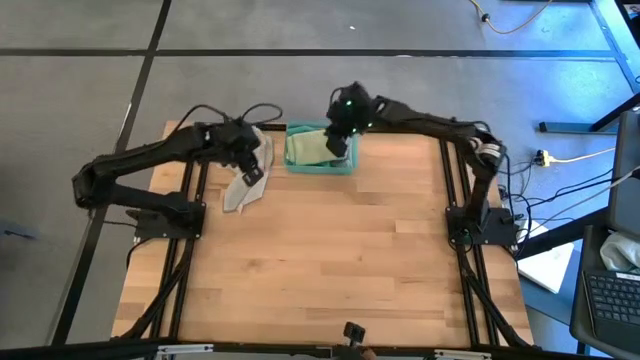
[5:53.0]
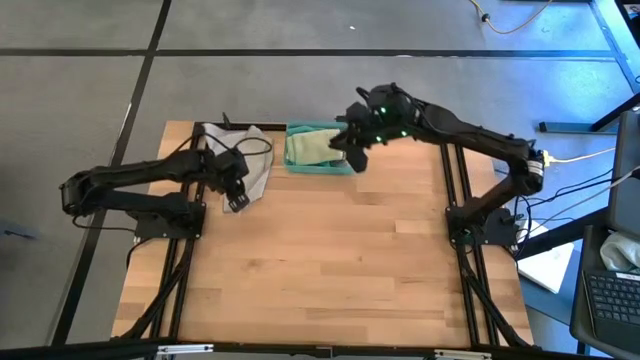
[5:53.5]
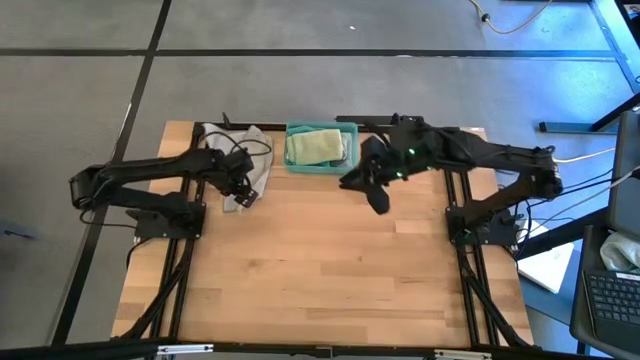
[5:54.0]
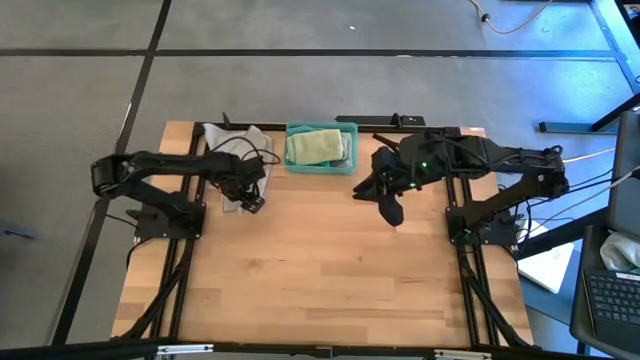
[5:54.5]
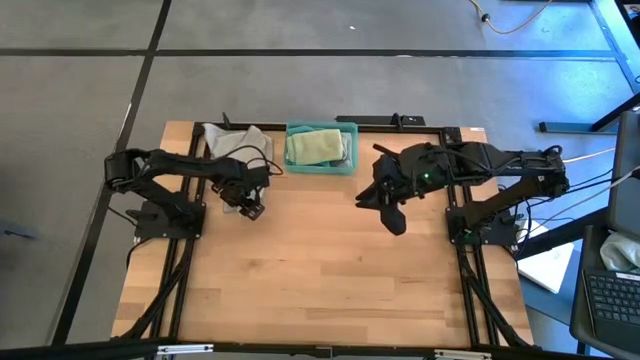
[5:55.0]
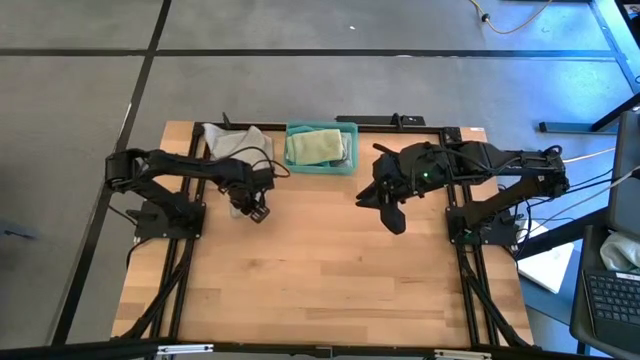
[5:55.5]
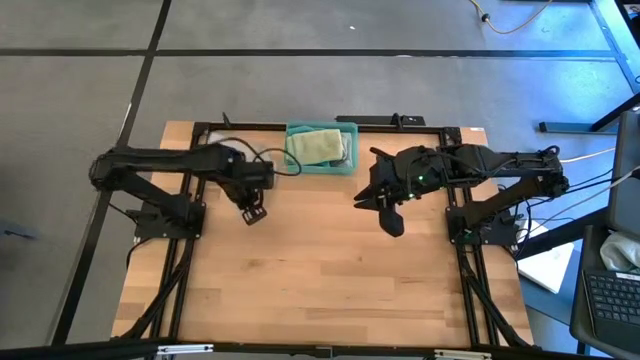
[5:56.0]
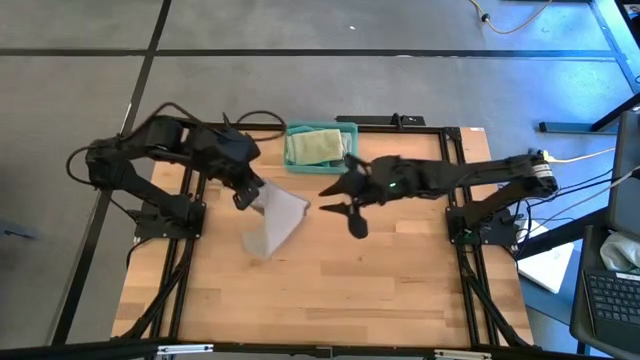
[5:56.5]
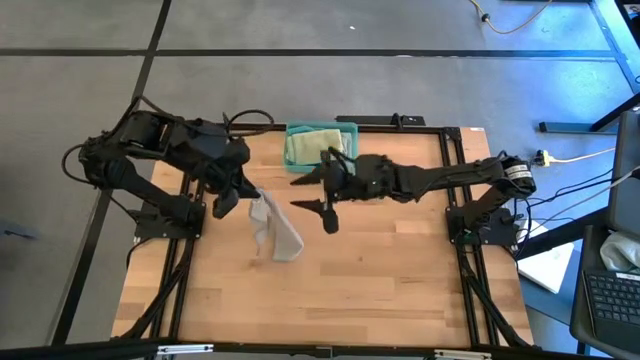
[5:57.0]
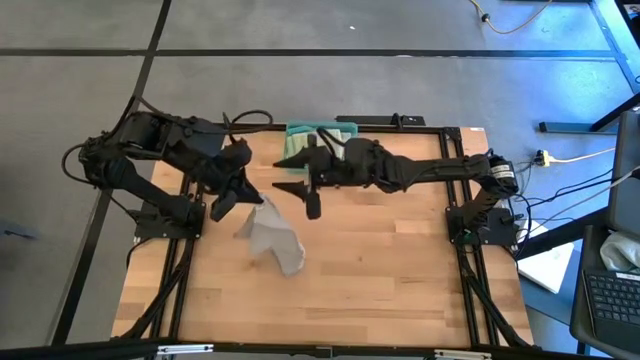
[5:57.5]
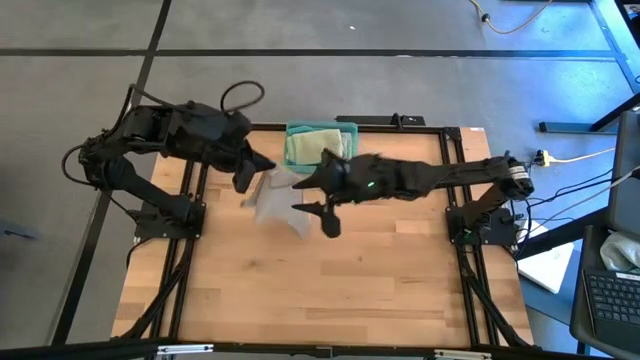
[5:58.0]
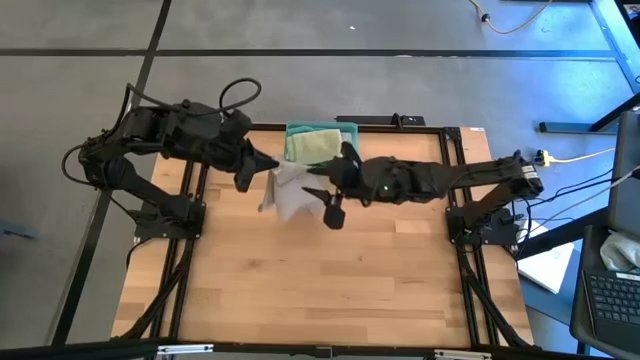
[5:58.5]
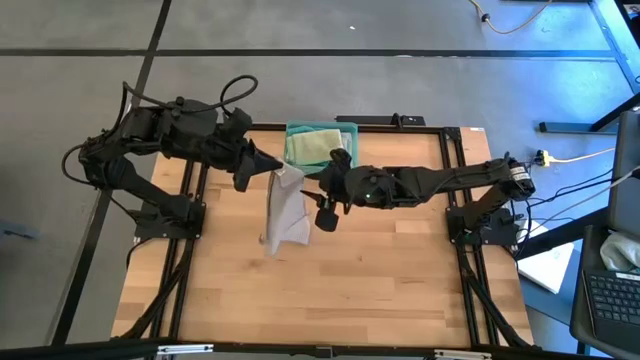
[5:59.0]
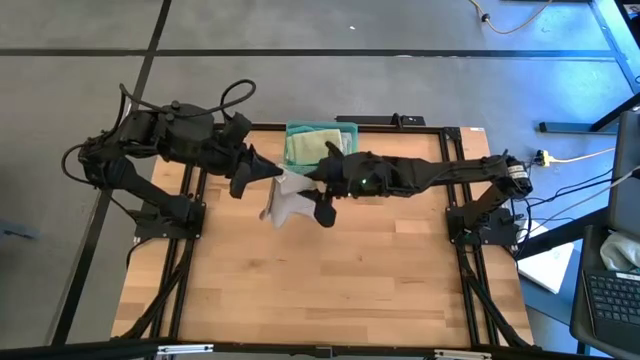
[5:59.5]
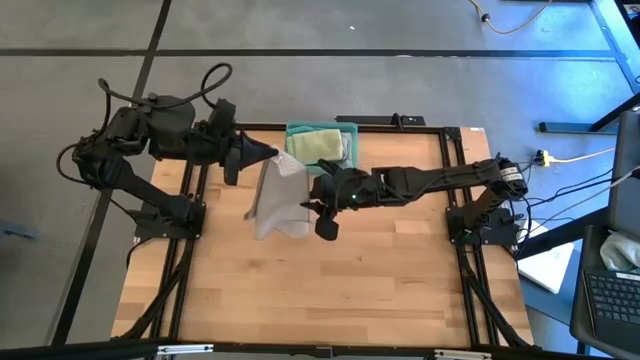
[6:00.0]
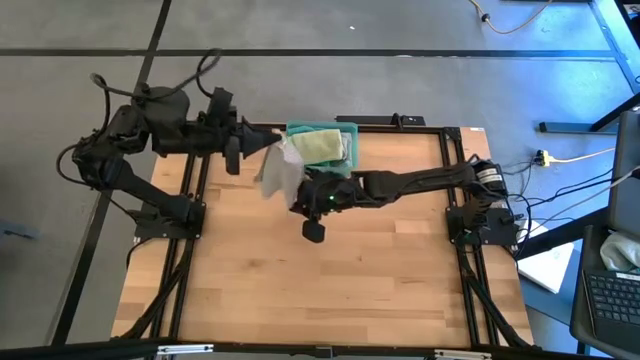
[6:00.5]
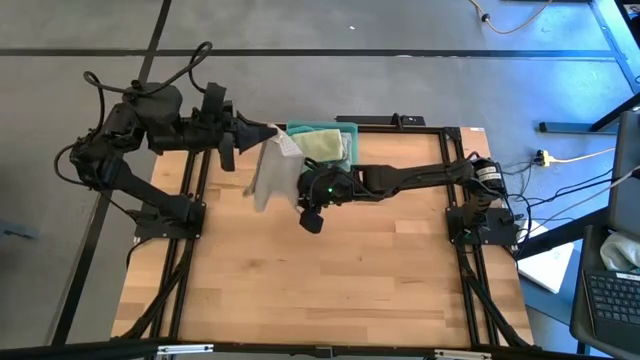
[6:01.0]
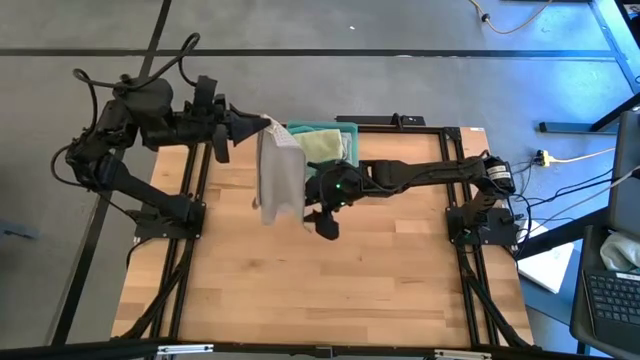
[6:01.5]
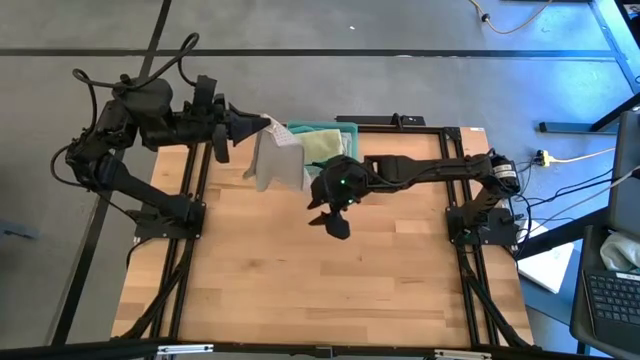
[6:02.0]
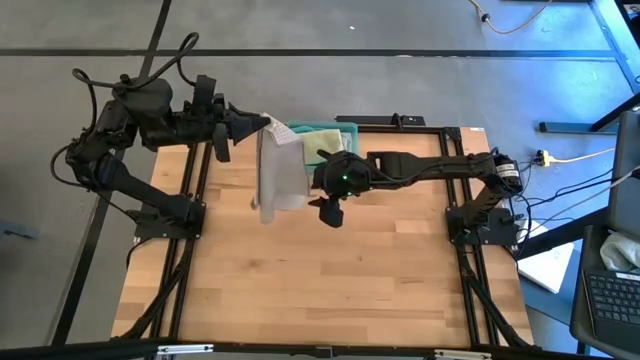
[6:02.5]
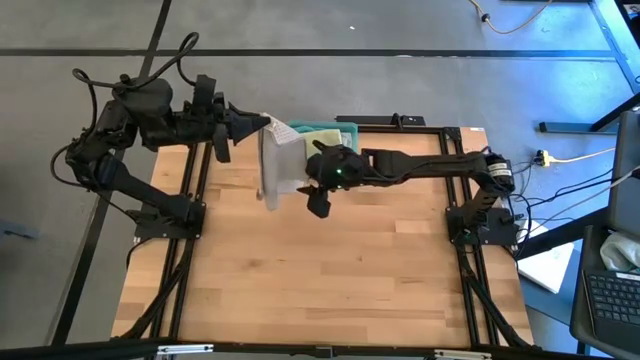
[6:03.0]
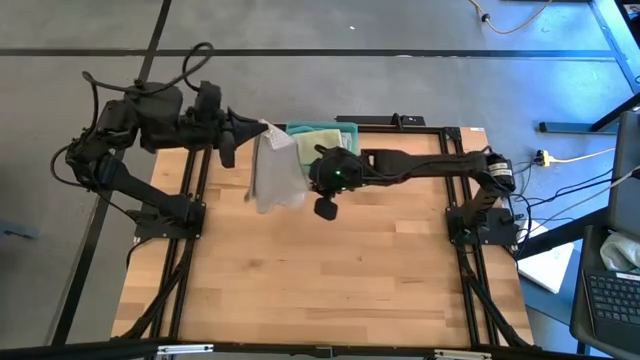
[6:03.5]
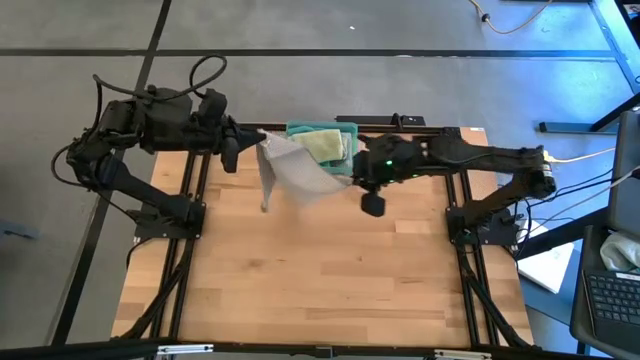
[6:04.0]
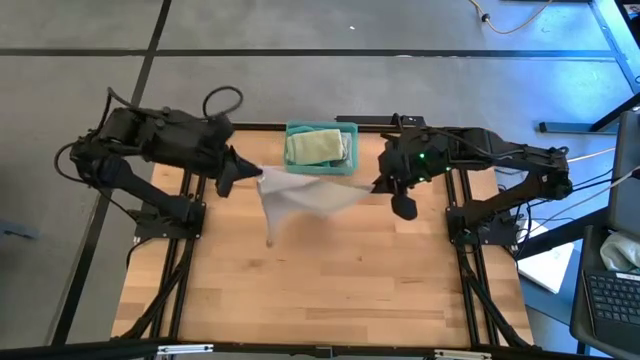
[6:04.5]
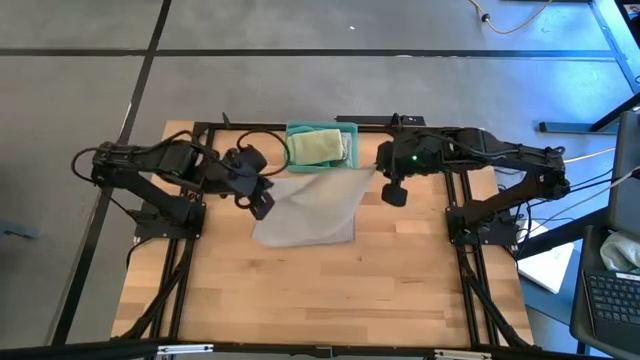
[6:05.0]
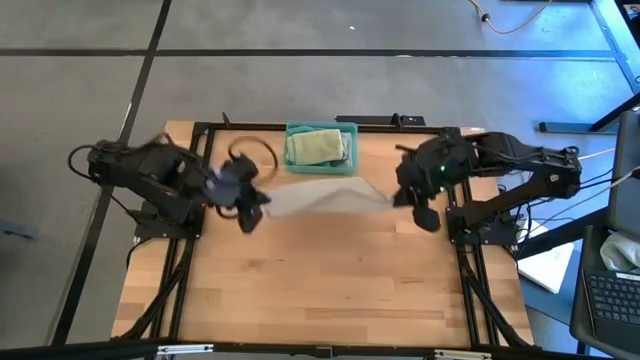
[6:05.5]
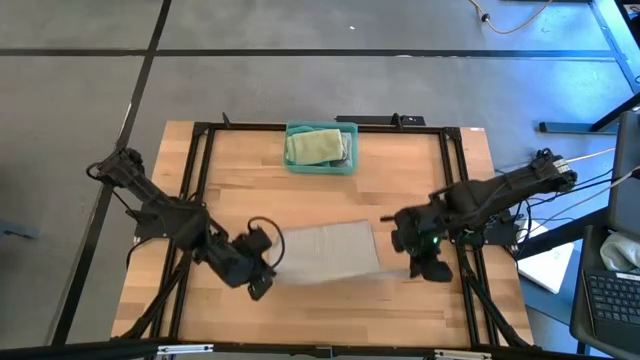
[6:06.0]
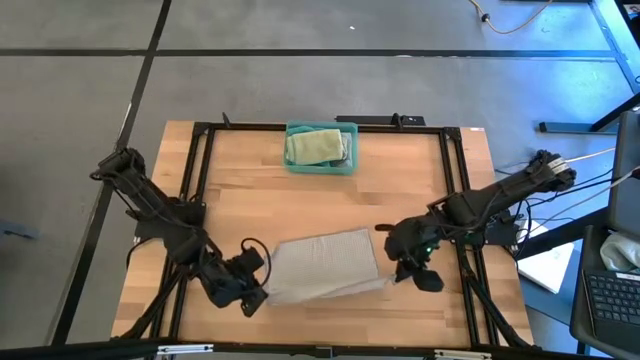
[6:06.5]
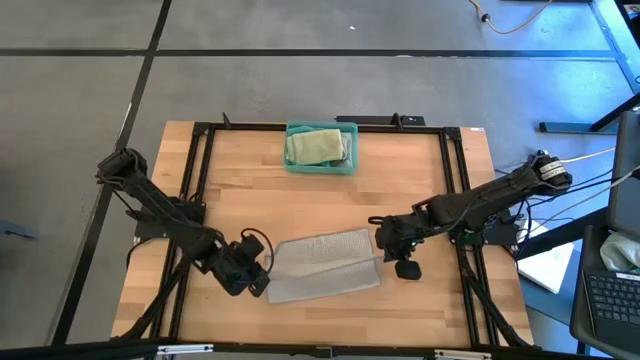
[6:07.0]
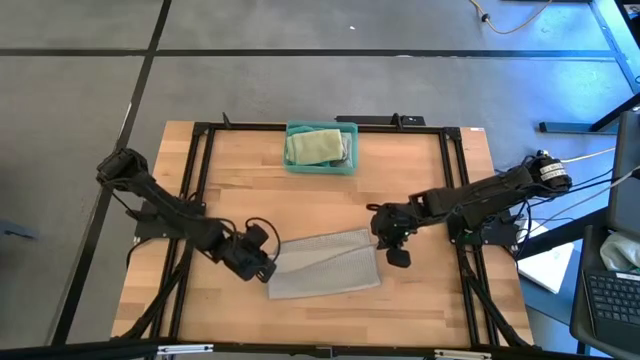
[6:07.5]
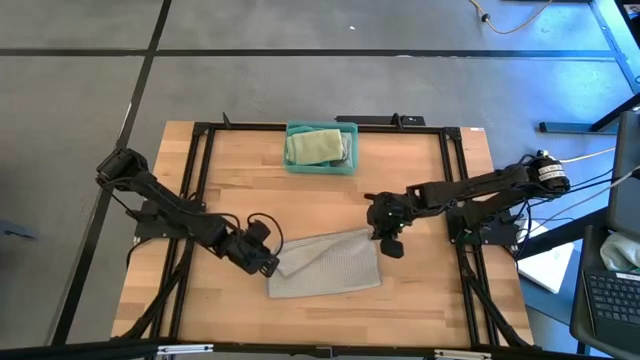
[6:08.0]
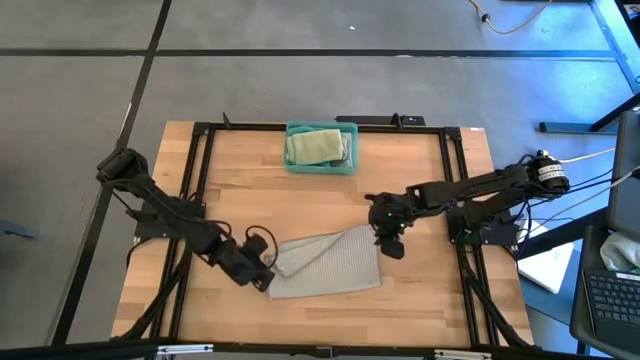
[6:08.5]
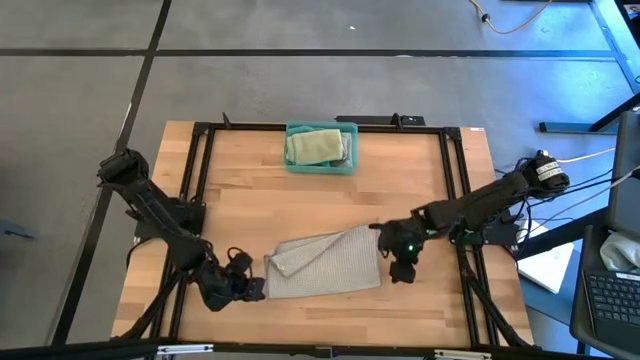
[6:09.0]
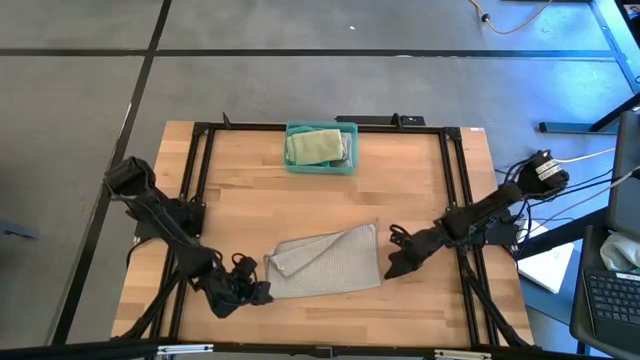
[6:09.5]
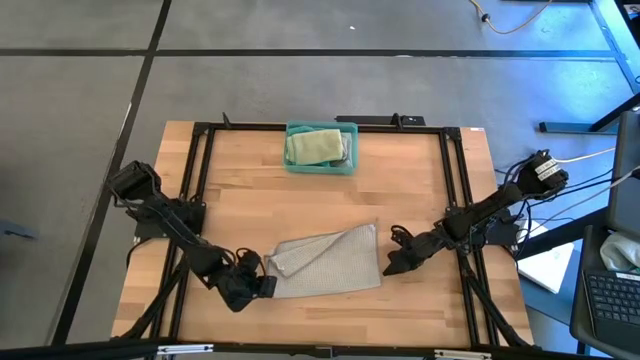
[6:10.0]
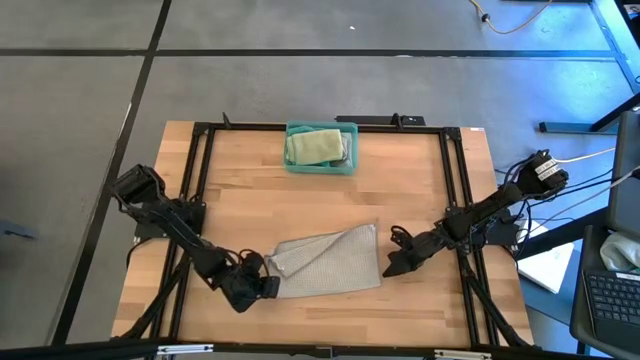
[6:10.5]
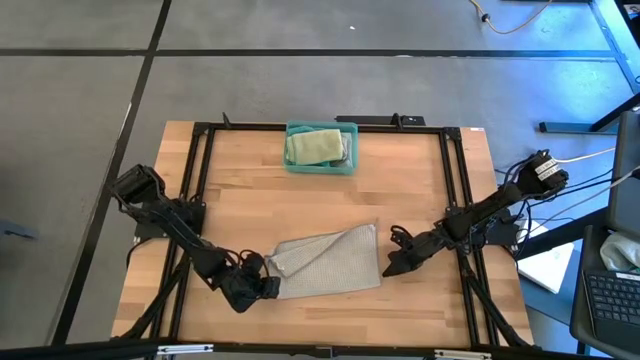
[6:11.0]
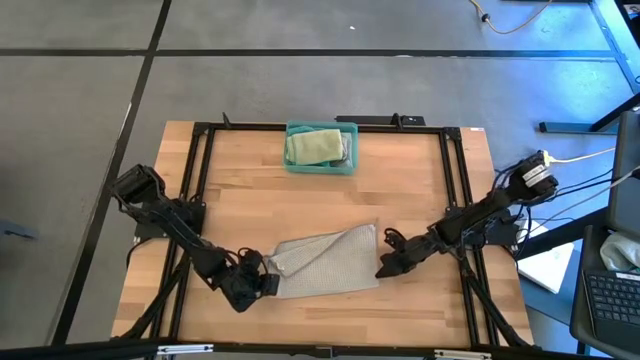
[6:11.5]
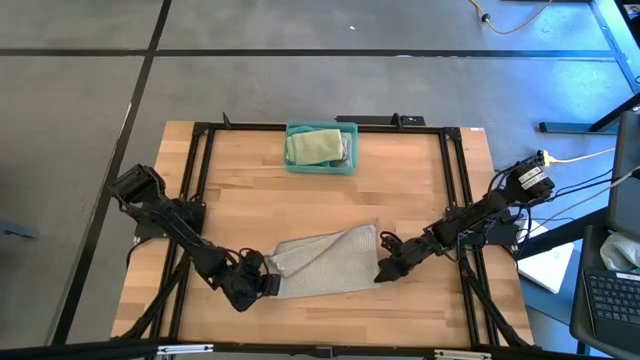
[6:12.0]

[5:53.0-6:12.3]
Task: Fold microfiber towels
Fold the gray towel

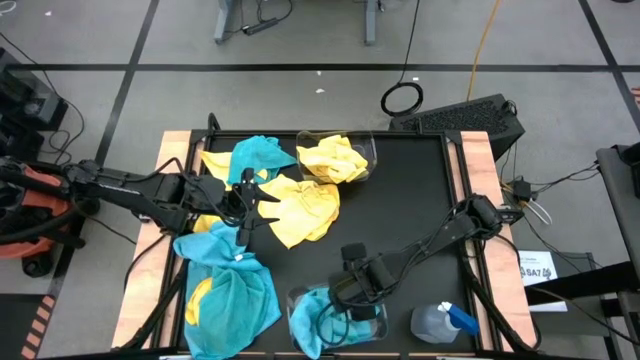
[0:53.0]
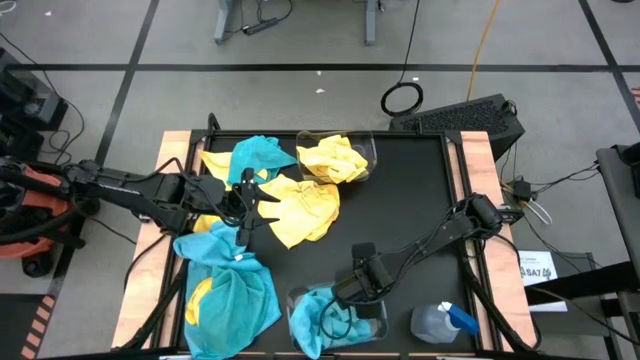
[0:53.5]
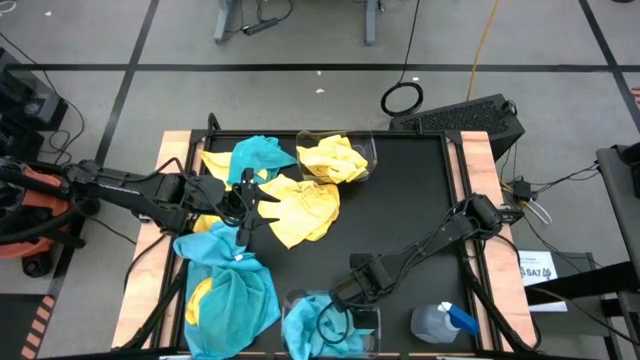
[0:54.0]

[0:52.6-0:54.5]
Task: Sort microfiber towel by color & place in baskets
Adjust the bottom transparent bin

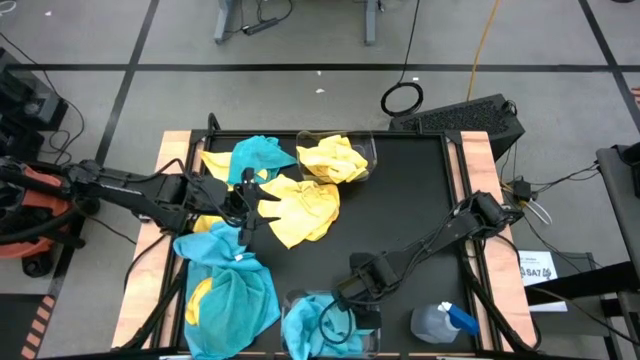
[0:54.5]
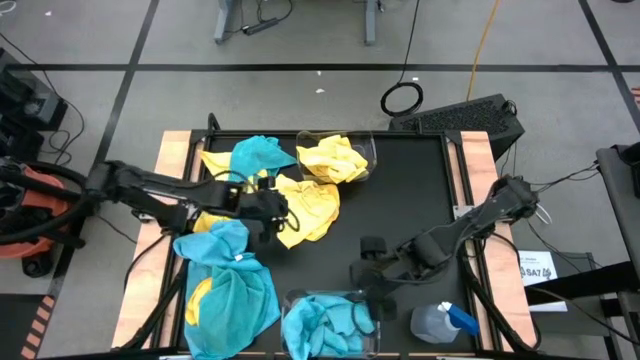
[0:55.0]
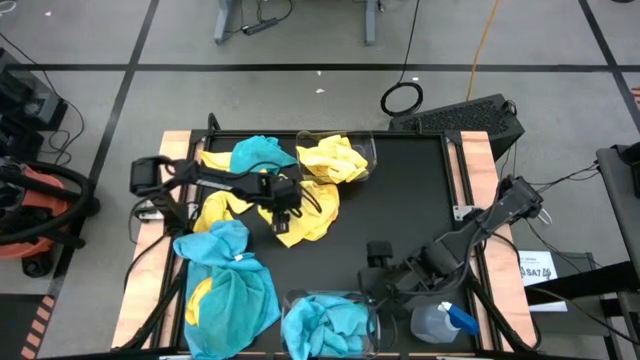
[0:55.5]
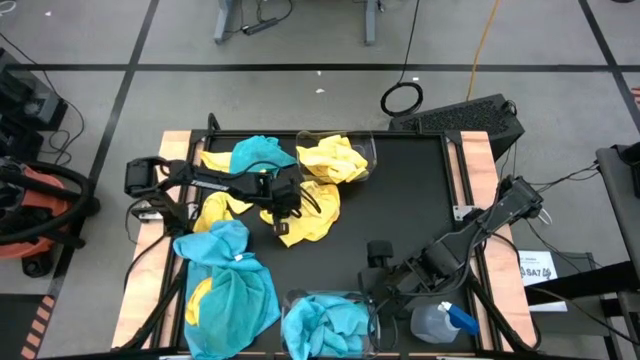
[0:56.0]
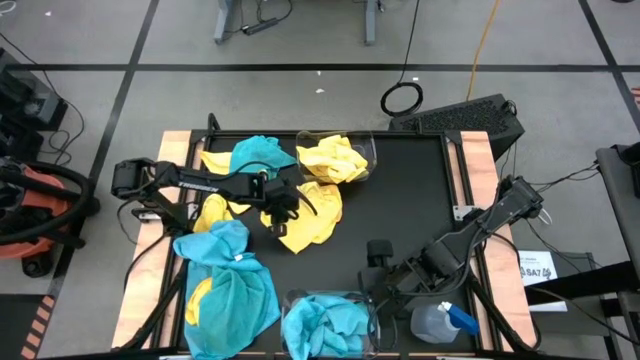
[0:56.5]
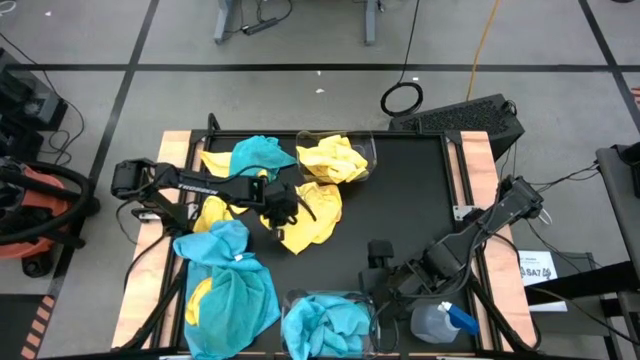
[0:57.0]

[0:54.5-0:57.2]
Put the yellow towel into the top transparent bin
